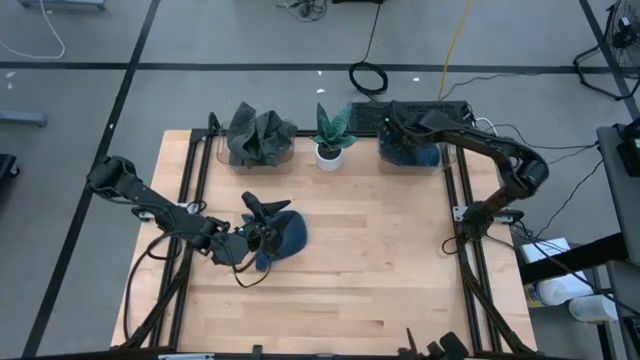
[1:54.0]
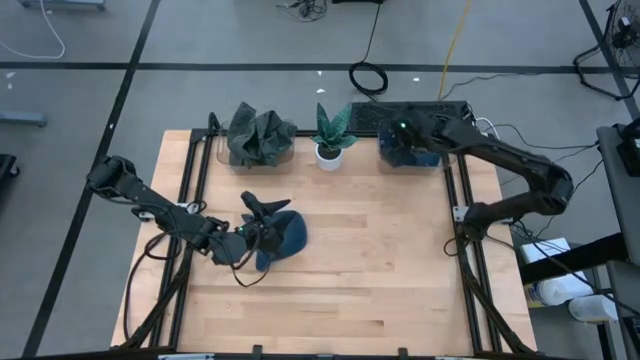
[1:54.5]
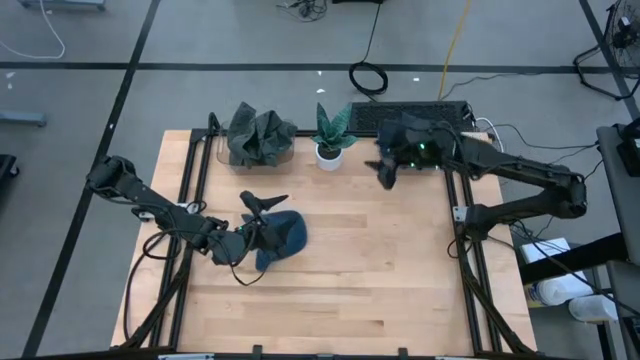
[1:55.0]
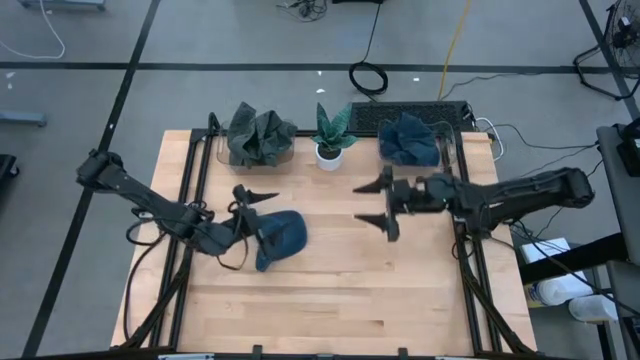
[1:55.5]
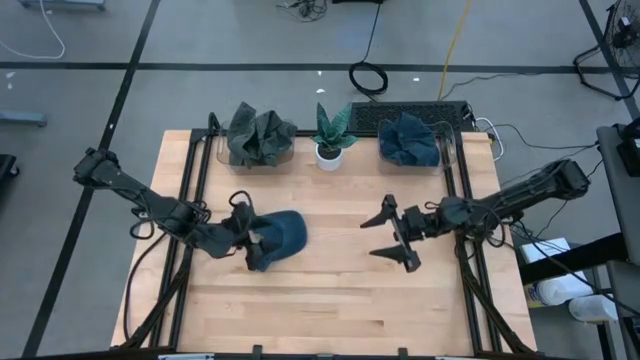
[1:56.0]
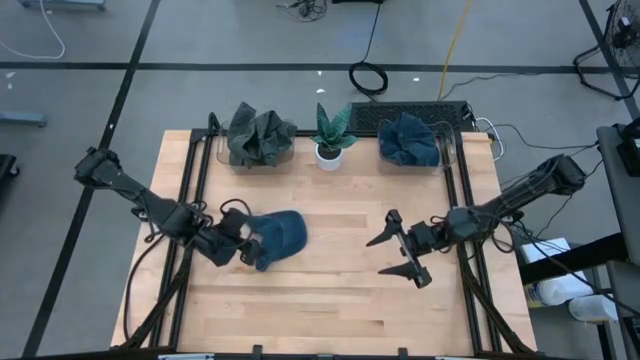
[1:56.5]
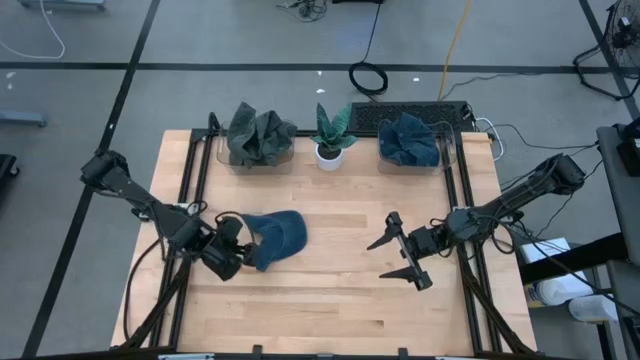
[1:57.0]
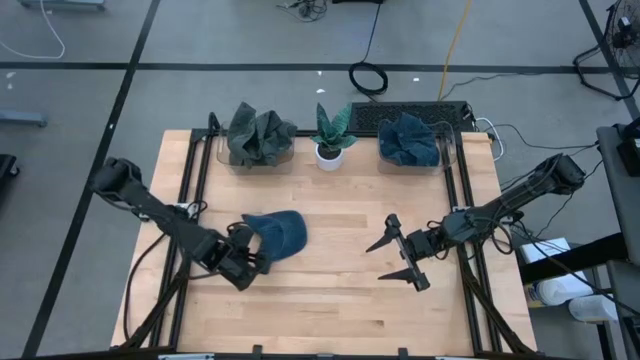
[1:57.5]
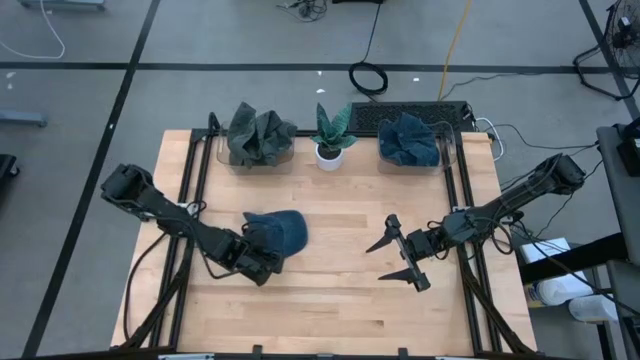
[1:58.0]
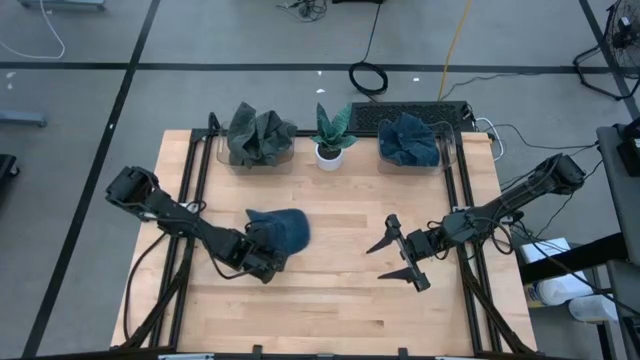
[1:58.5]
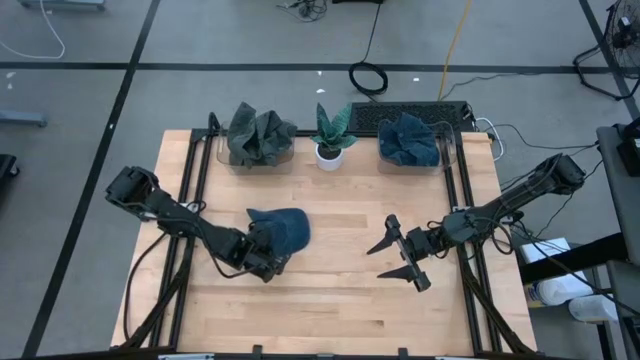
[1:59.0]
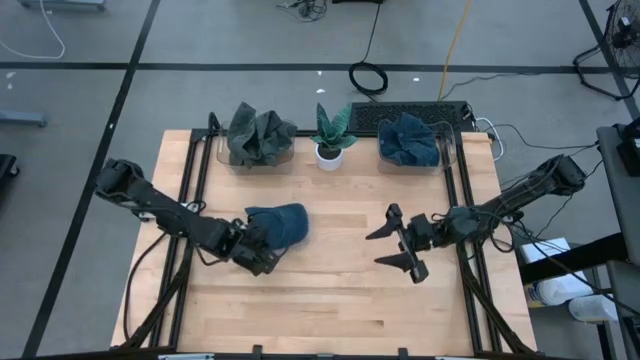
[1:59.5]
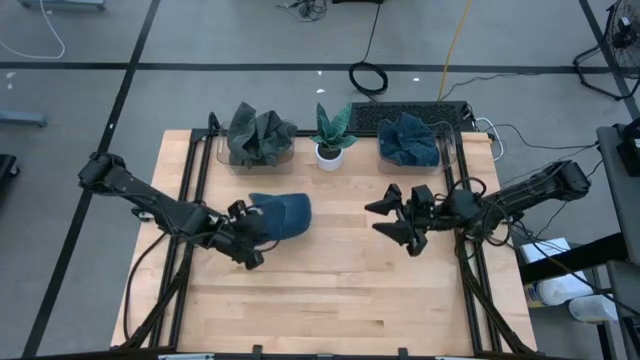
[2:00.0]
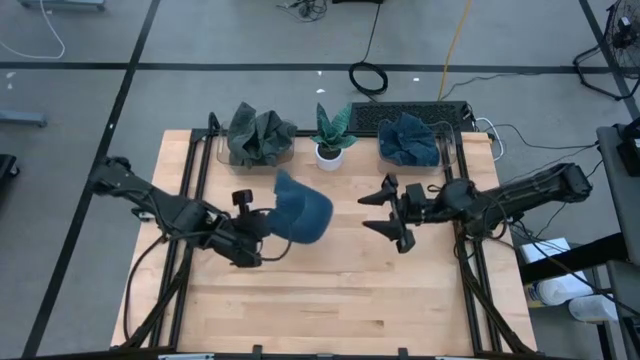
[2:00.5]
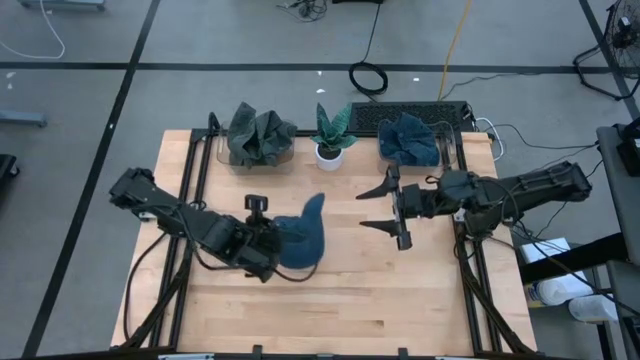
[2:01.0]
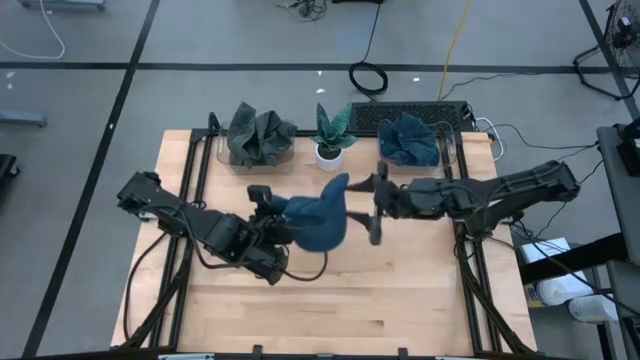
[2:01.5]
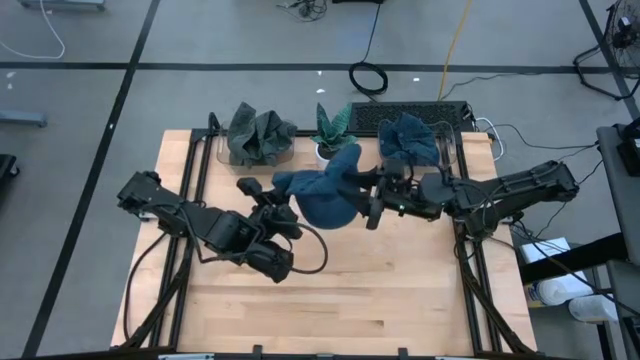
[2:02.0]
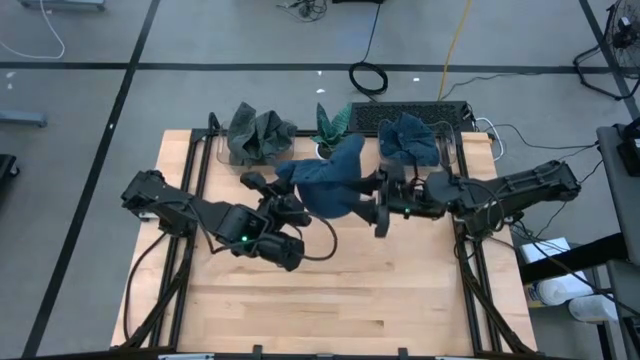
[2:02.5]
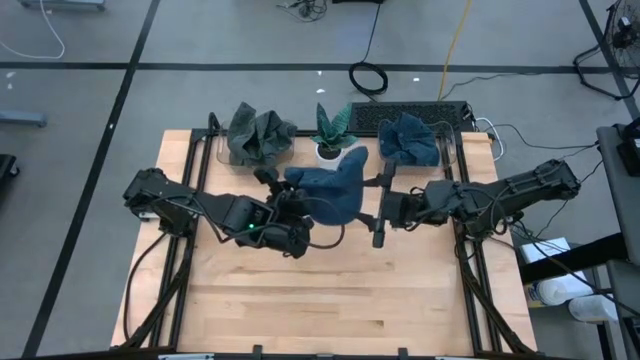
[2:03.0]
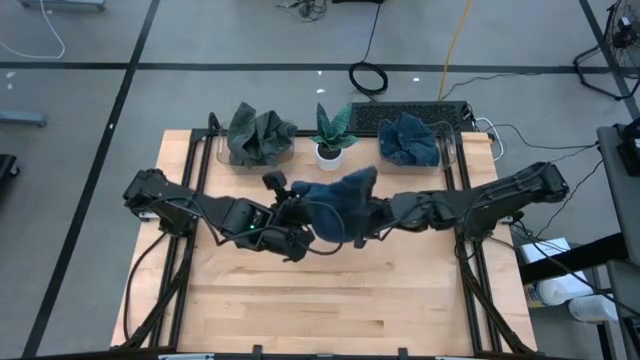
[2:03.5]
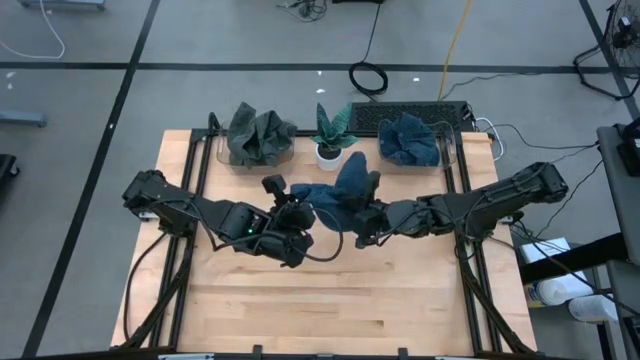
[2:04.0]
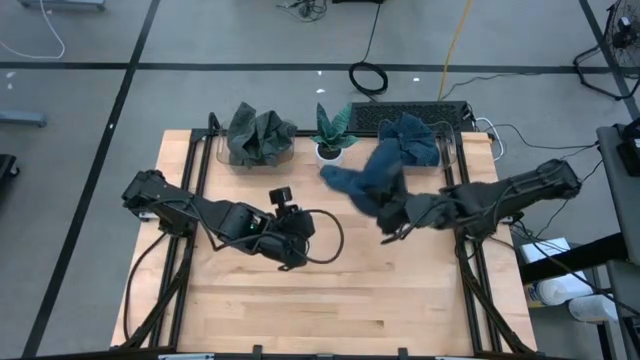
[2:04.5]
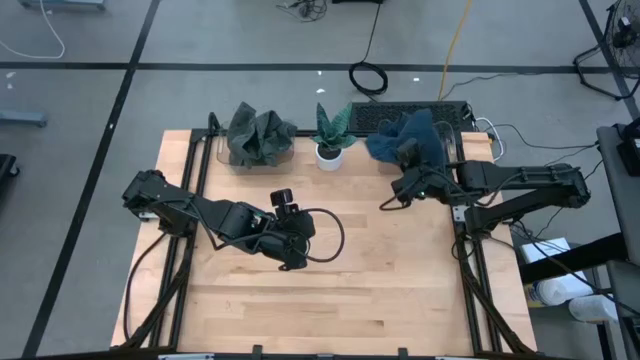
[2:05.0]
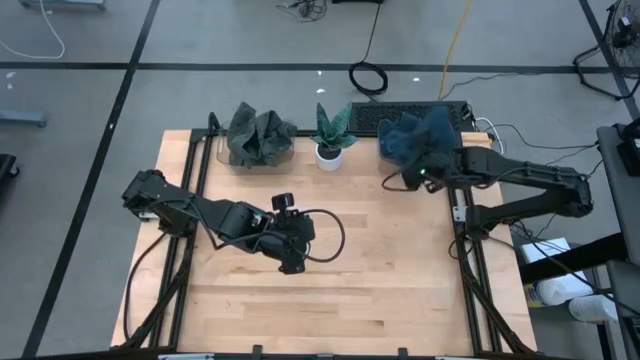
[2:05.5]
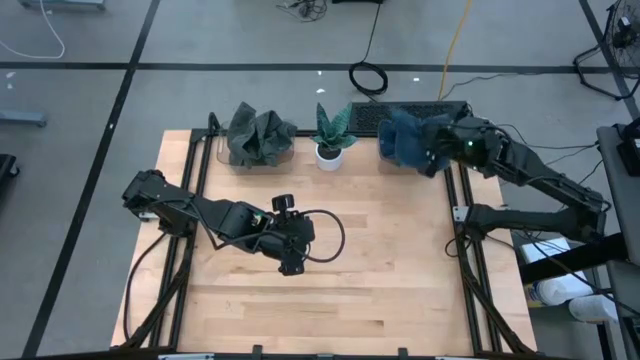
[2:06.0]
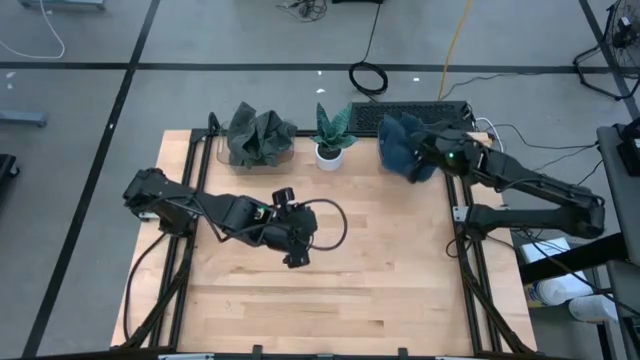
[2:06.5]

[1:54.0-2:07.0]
Task: Pick & Place hat
Put the blue cap into the right transparent bin

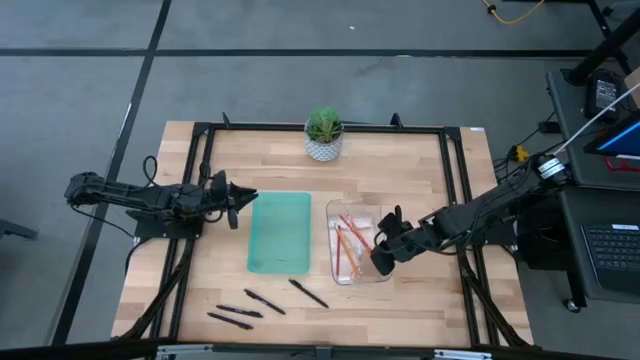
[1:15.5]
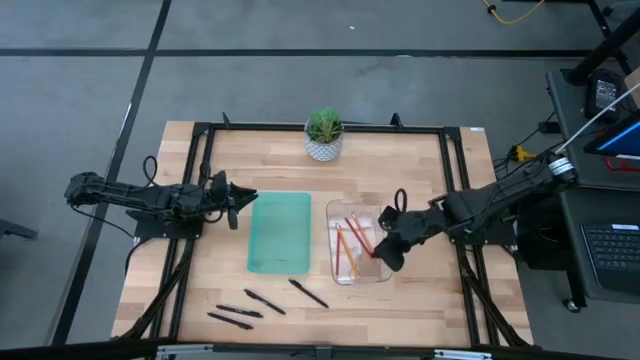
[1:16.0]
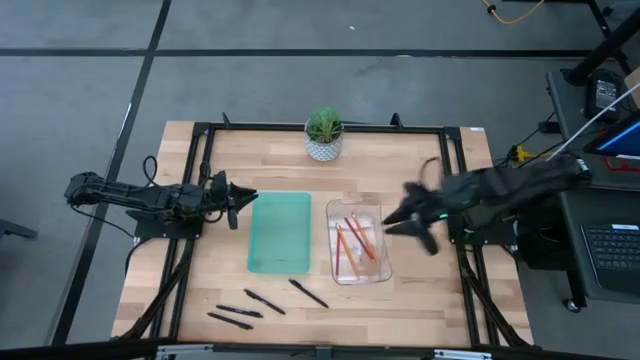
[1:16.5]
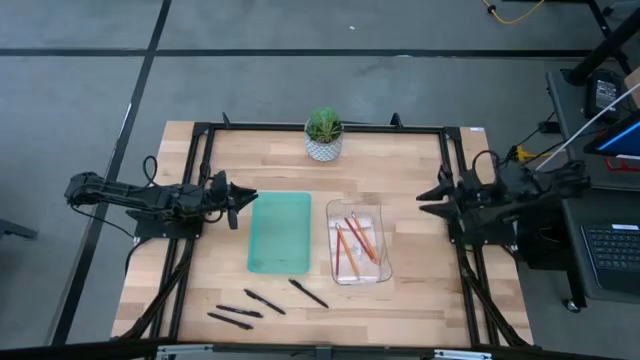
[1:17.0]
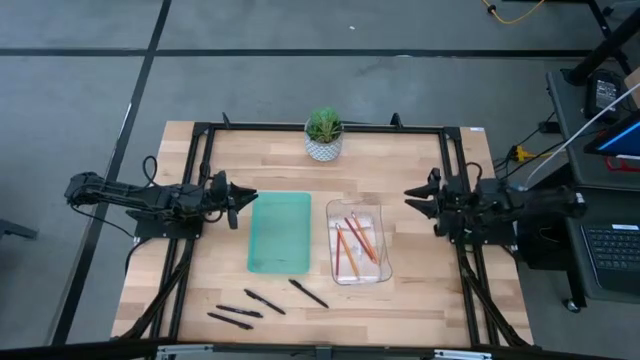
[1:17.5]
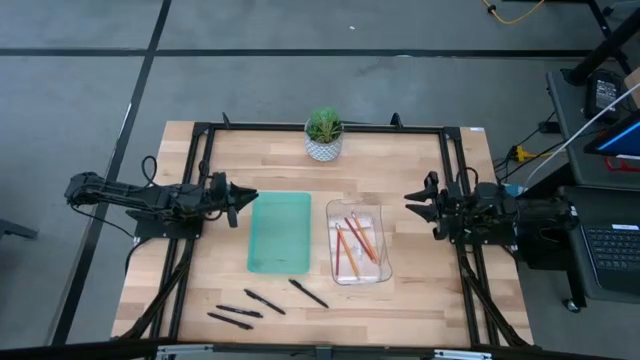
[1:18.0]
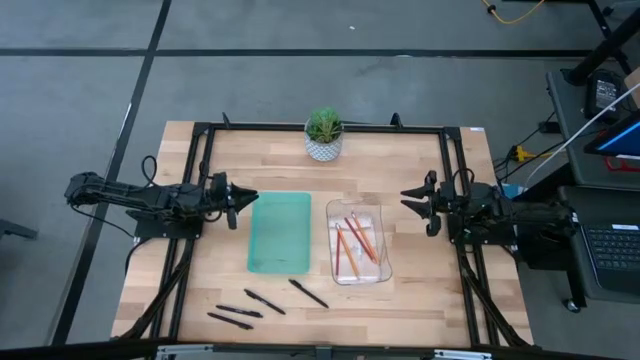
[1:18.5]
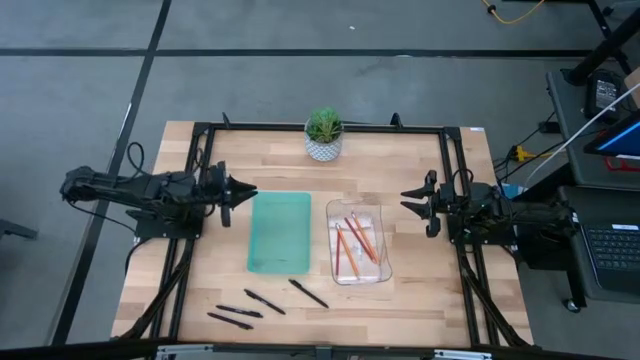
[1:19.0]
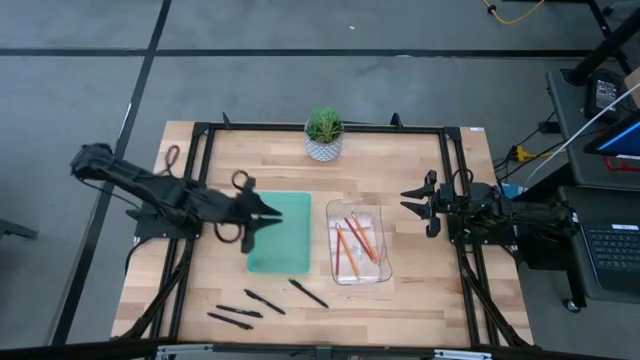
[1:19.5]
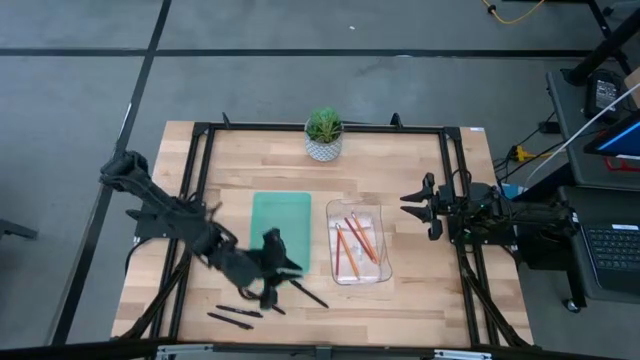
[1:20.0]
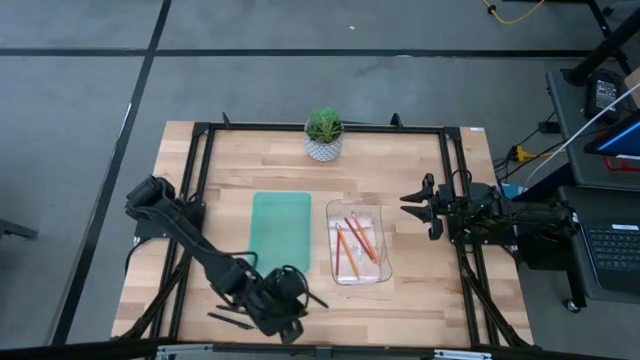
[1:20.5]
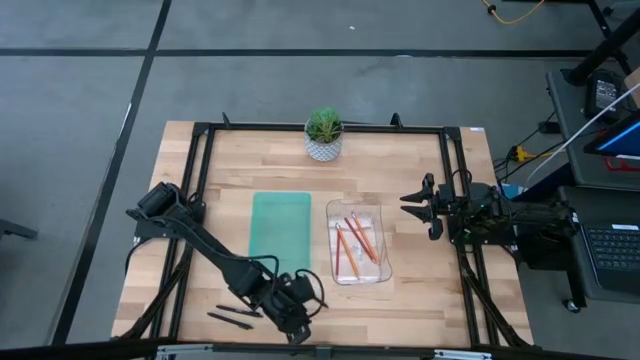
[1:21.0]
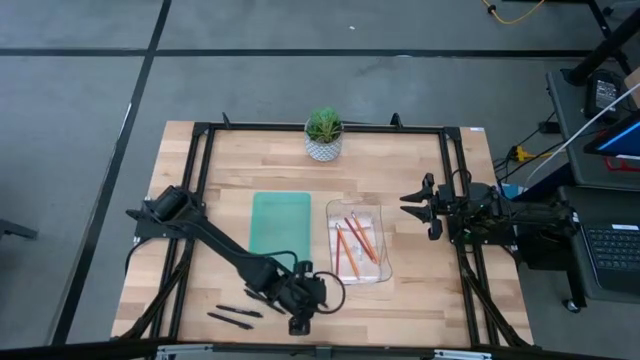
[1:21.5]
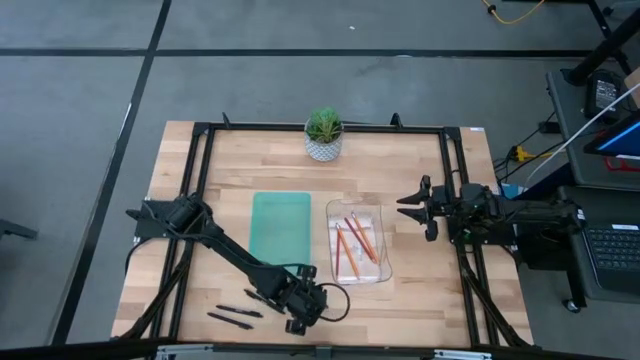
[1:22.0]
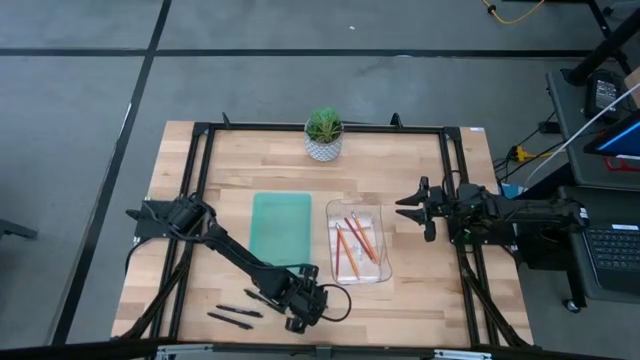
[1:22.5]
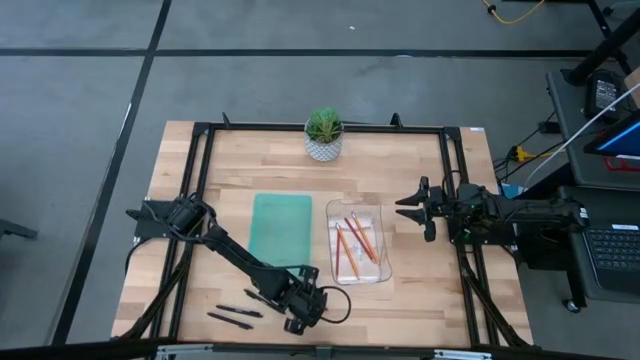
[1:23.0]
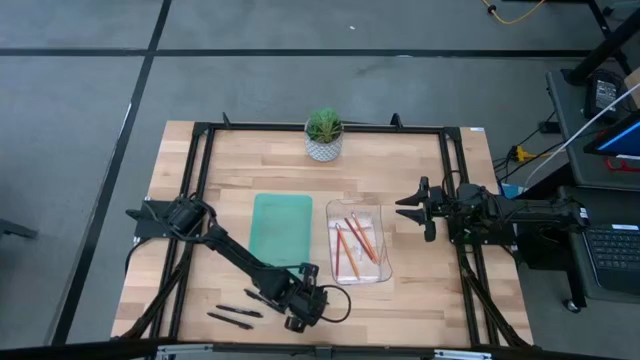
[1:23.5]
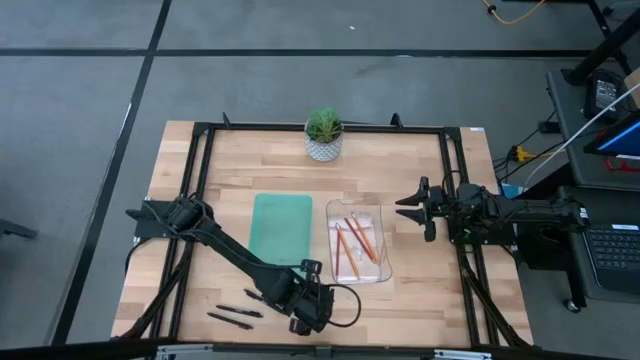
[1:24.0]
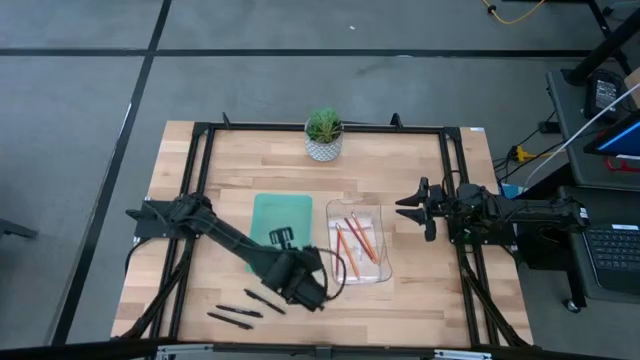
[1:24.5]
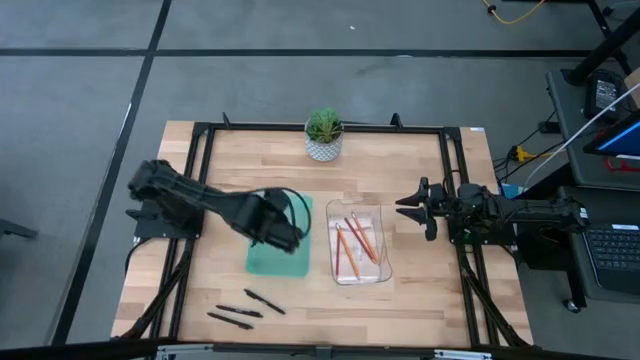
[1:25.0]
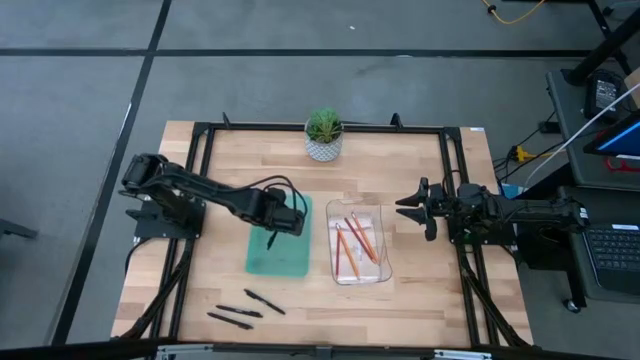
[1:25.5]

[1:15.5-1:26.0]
Task: Sort pens & pencils
Put the black pen into the blue bin
